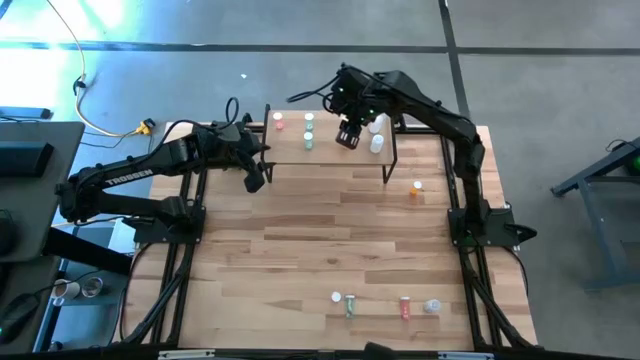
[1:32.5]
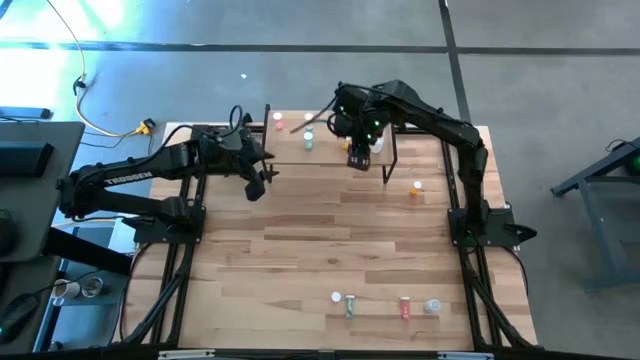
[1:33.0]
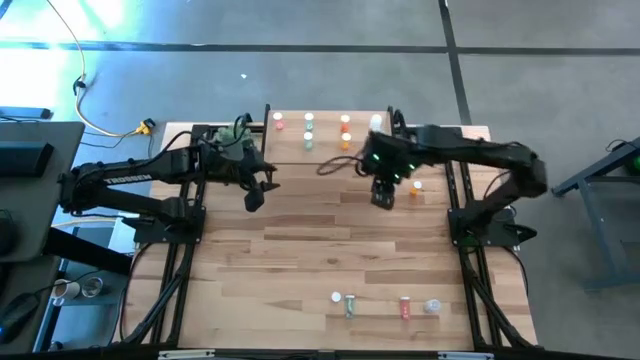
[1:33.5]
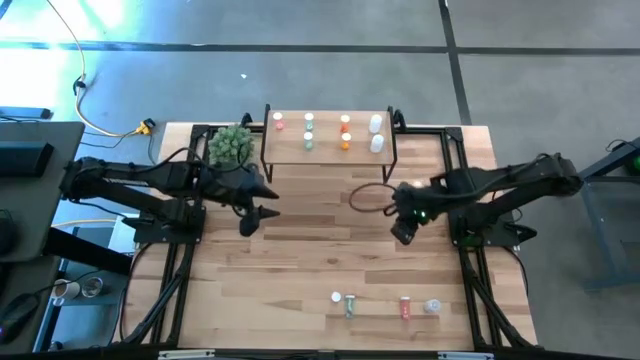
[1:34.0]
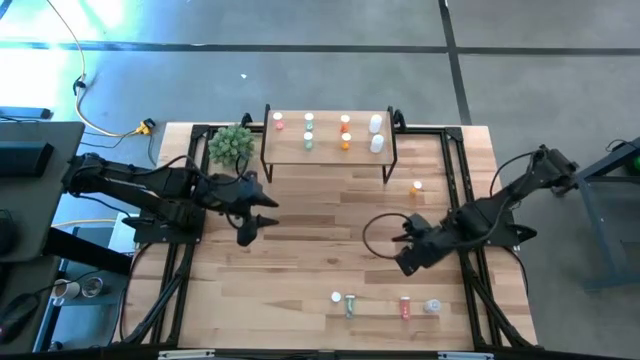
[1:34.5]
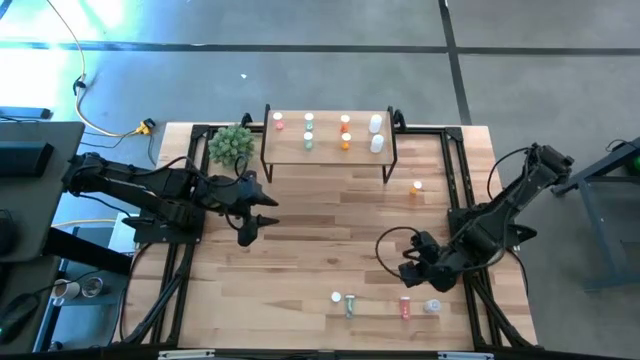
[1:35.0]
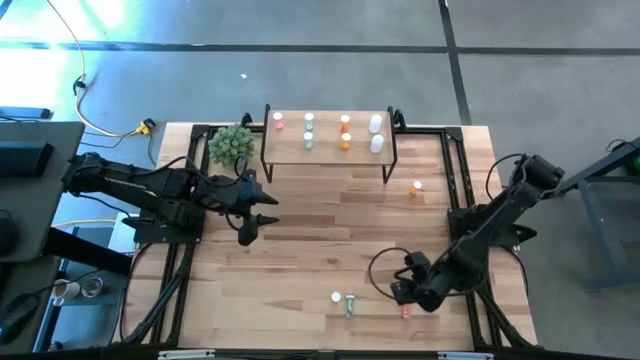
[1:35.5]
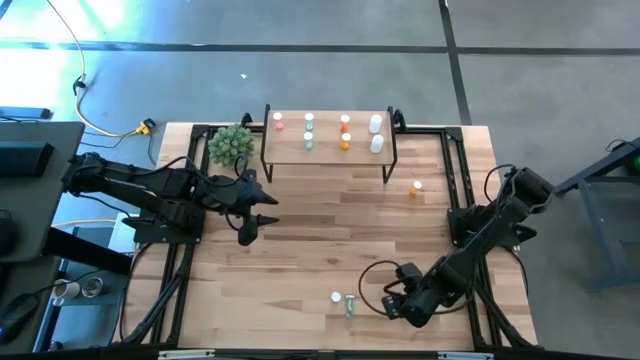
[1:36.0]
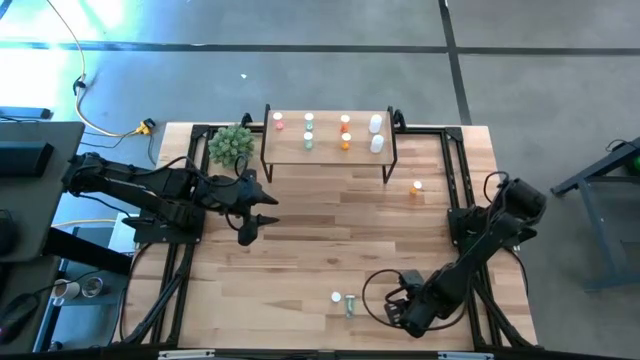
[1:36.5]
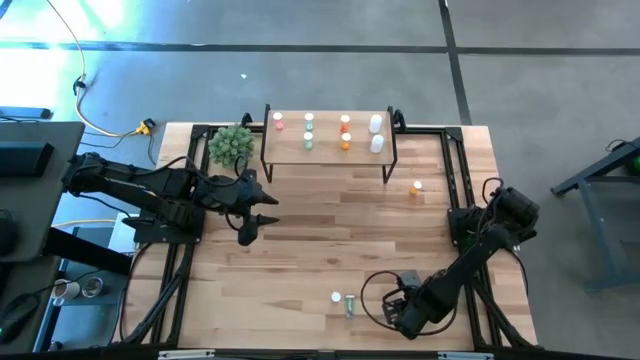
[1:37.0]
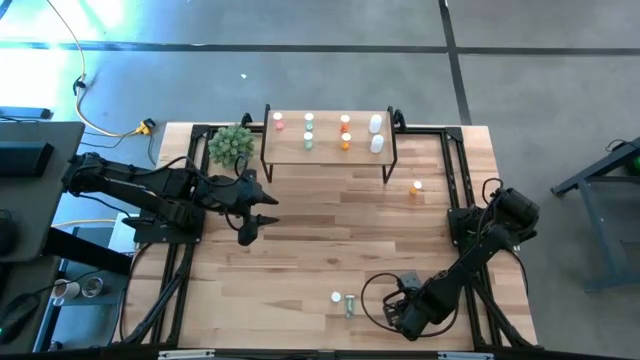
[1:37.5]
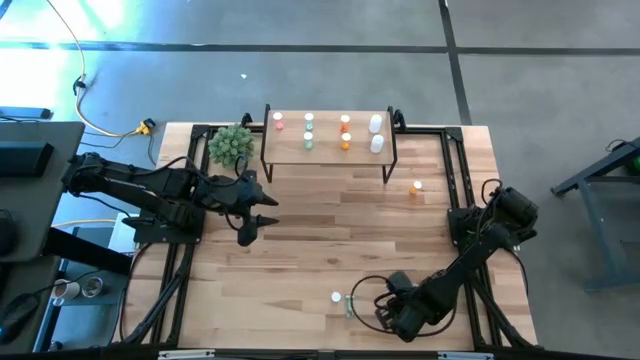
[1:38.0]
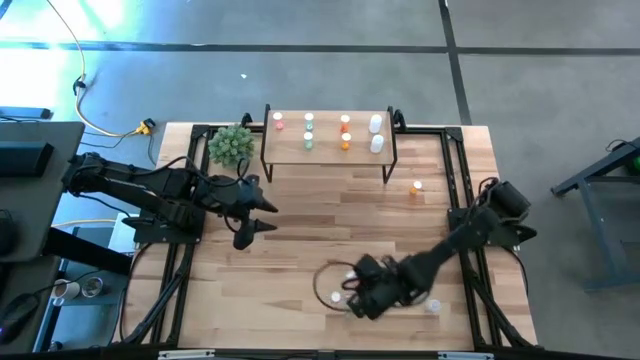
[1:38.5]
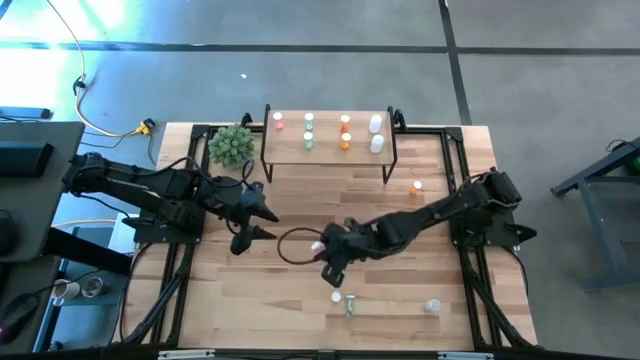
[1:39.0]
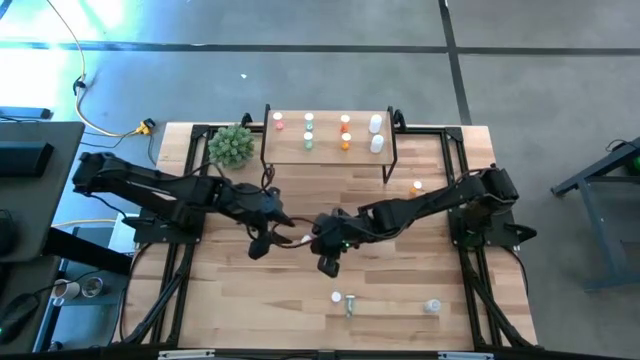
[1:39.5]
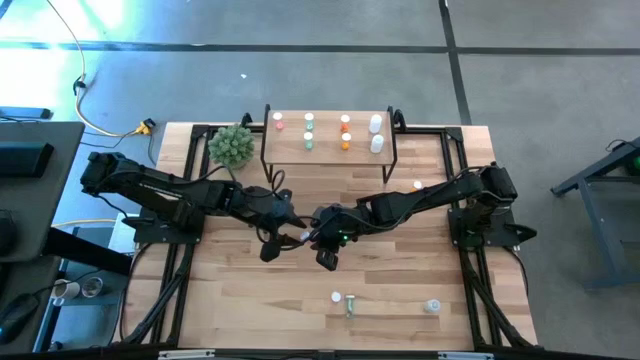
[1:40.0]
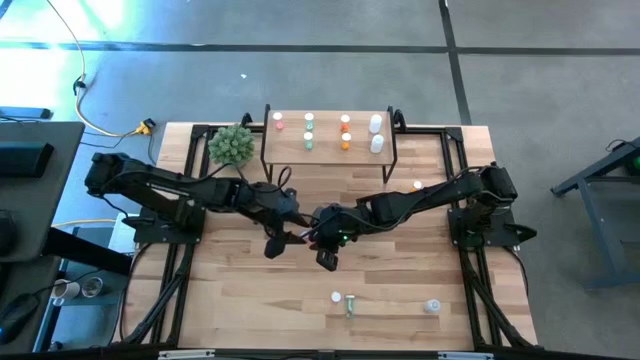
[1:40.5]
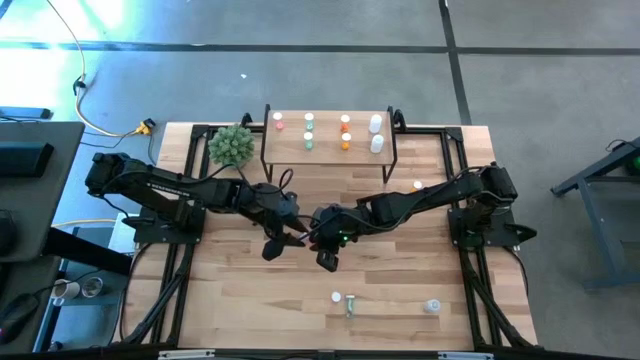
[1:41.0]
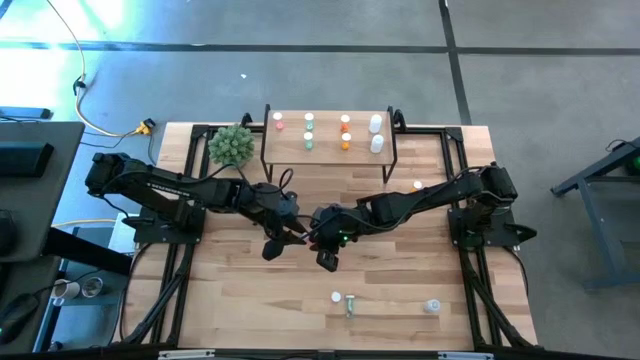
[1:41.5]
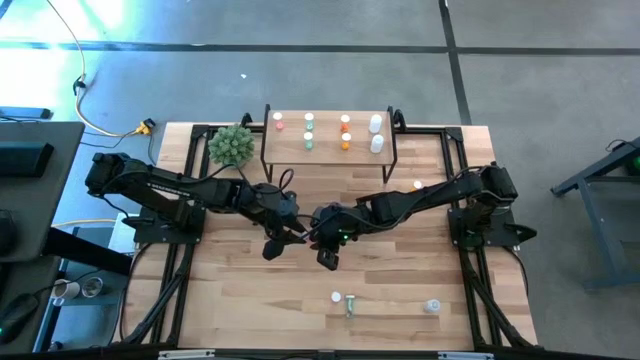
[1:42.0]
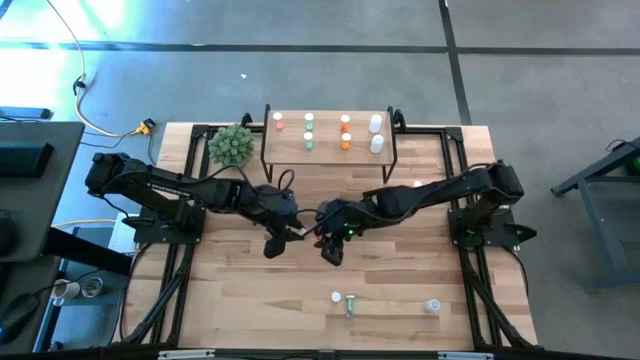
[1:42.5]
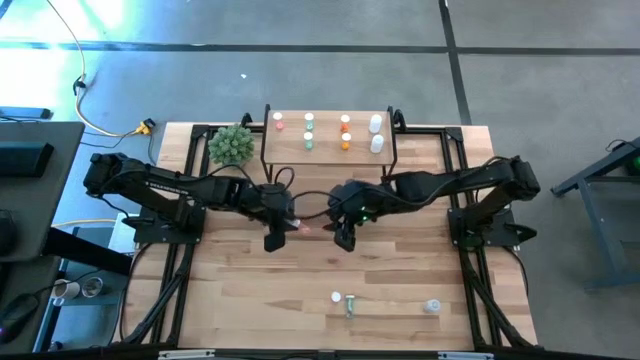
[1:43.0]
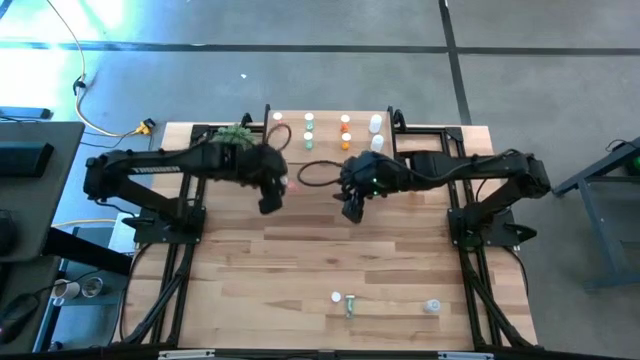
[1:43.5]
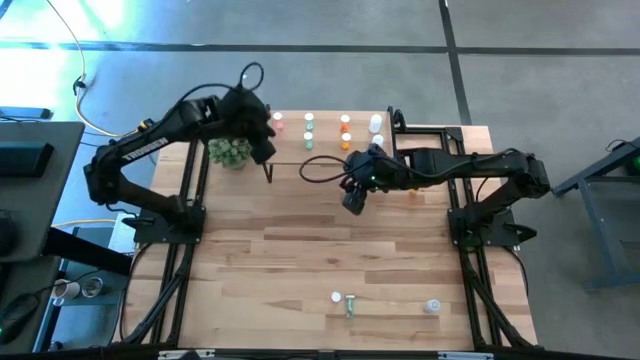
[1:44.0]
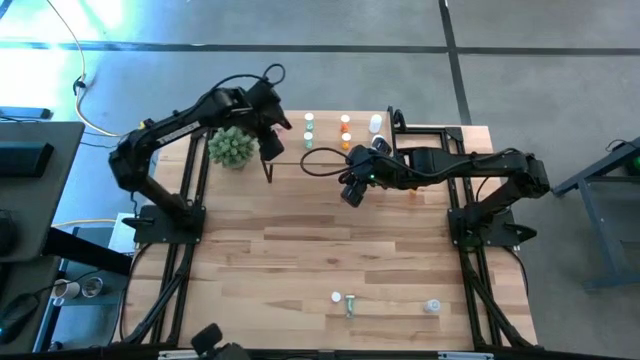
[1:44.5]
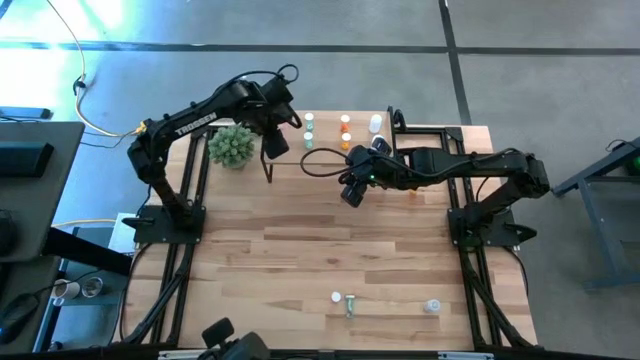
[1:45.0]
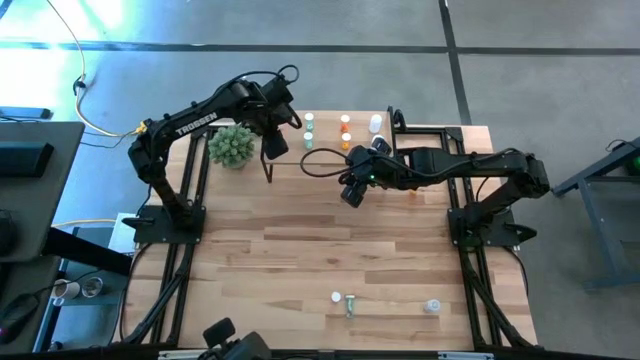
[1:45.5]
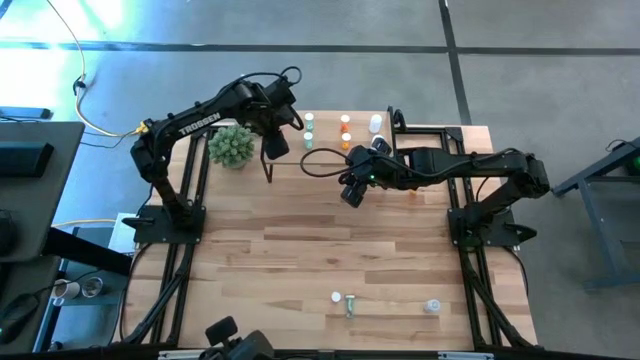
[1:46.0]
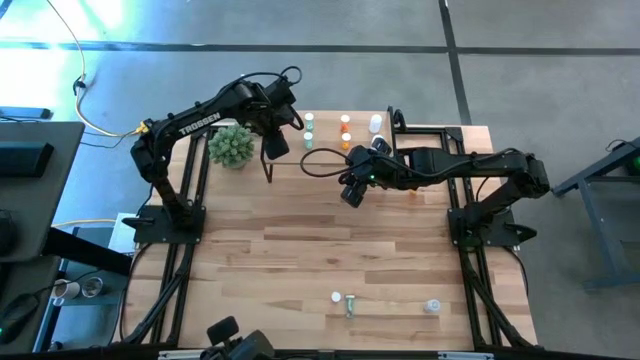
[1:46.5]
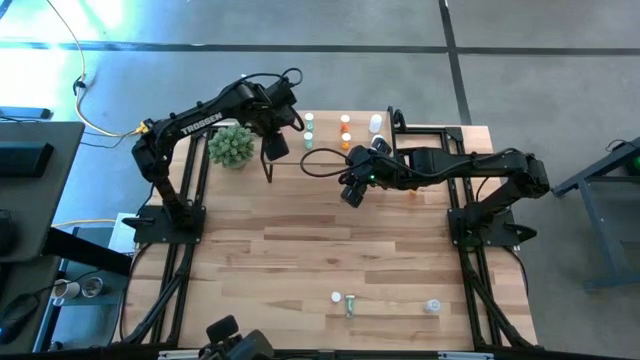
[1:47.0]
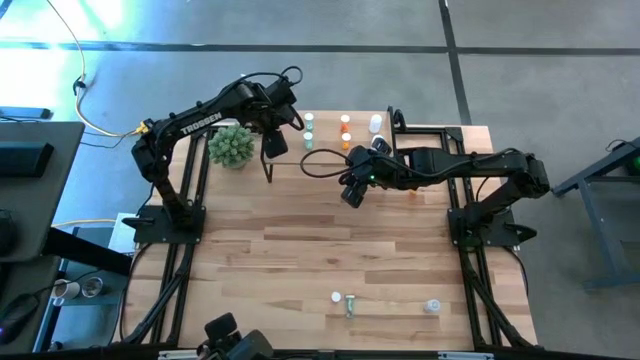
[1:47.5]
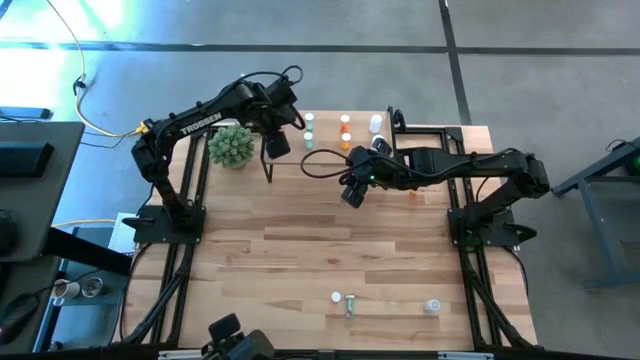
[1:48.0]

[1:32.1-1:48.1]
Task: Pick and place medicine bottles onto shelf by color
Put the right pink bottle on the shelf aligned with the other pink pill bottle

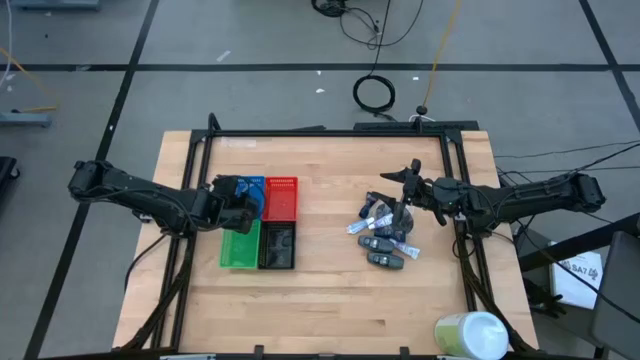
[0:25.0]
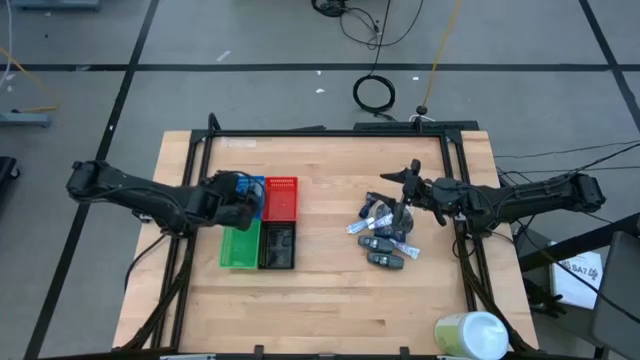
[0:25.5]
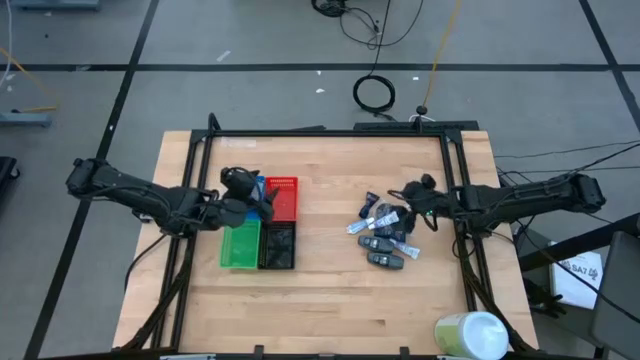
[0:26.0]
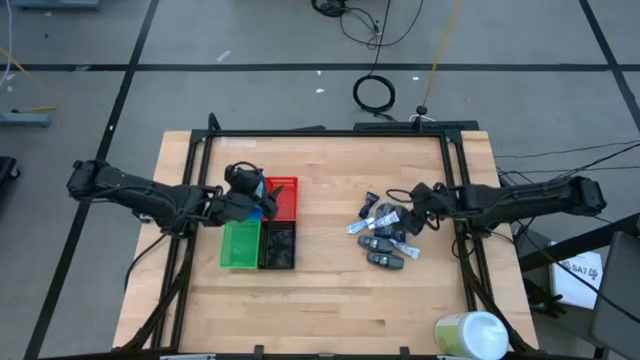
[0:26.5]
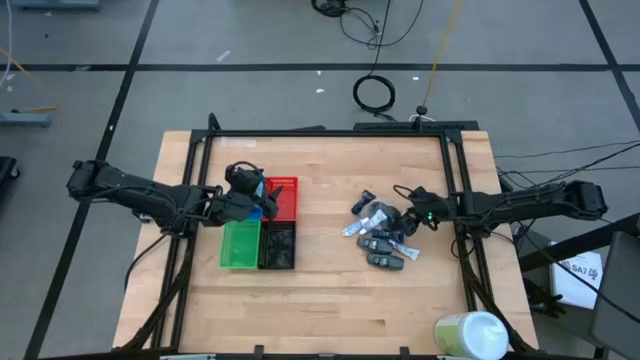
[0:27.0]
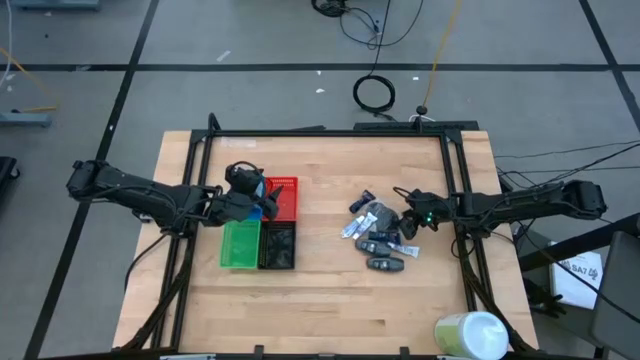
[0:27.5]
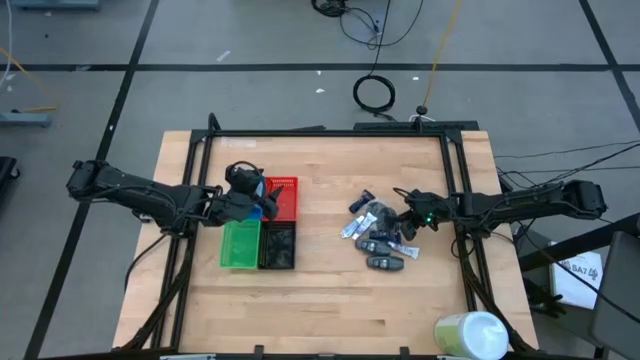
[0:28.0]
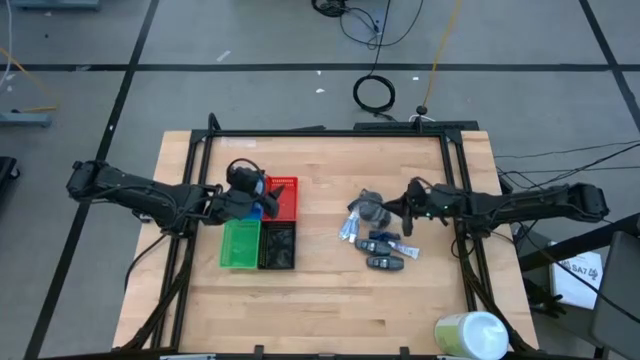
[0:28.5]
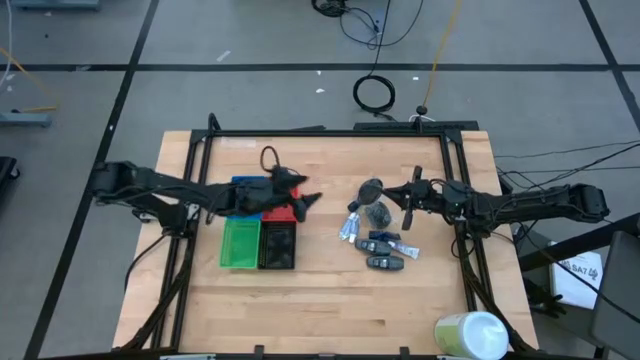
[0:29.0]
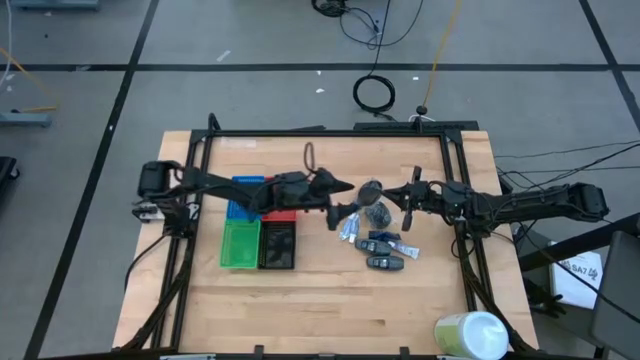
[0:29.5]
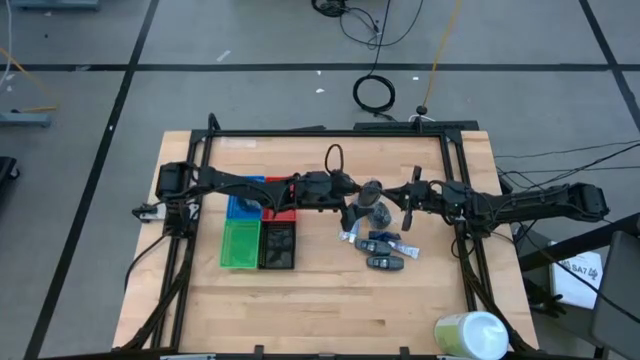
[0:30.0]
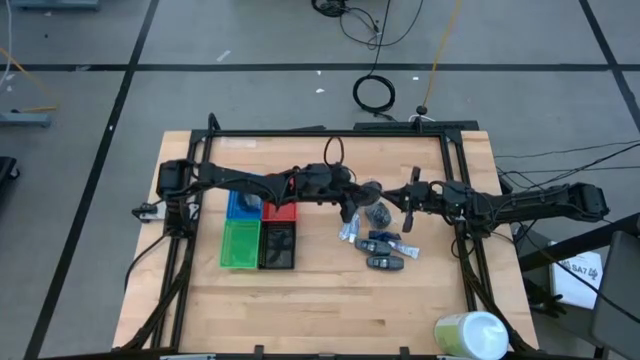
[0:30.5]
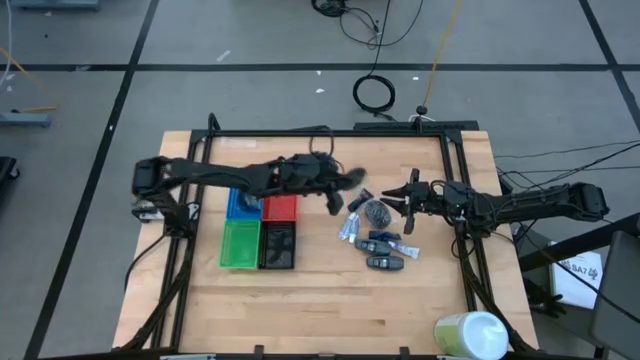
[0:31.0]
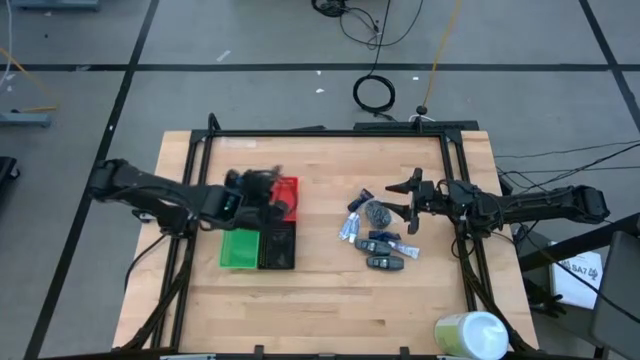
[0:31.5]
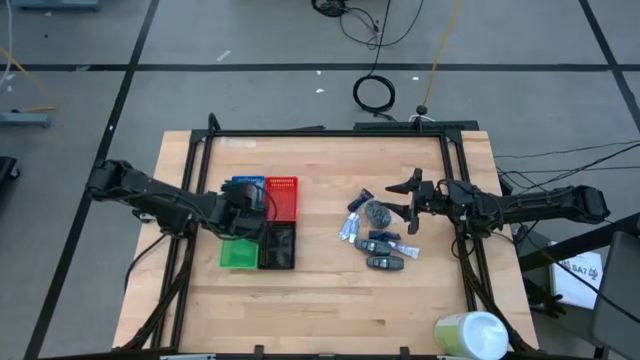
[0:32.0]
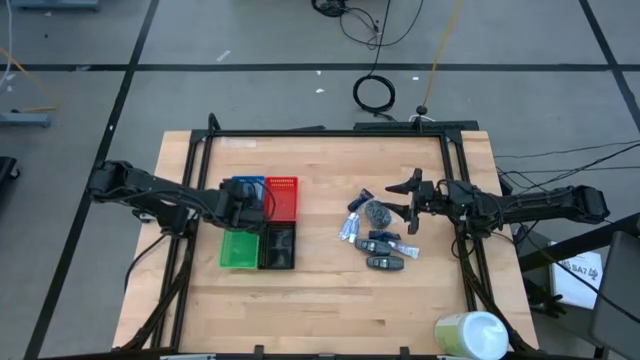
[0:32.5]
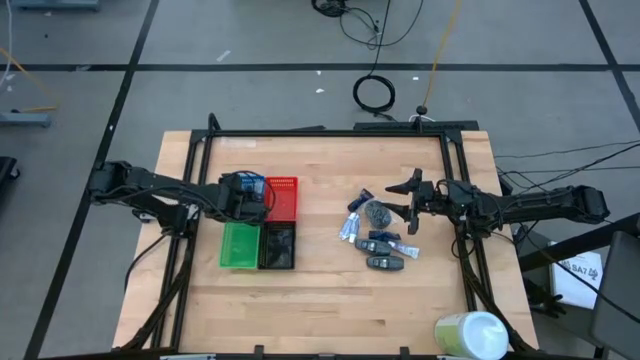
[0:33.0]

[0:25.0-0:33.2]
Task: Pick & Place Travel size toiletries
Put the right black hairbrush into the blue bin
